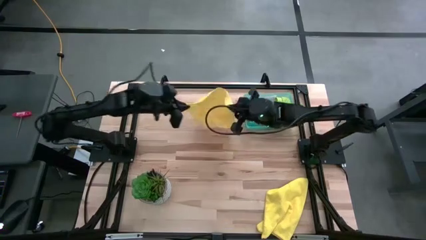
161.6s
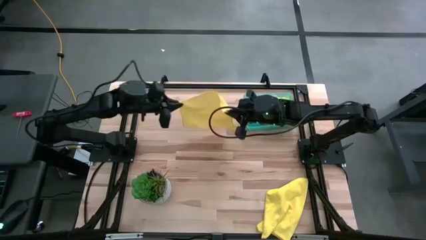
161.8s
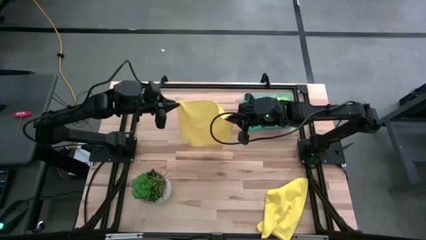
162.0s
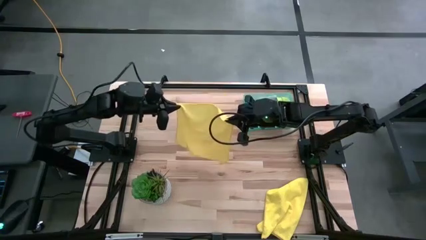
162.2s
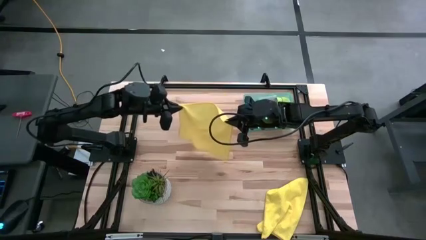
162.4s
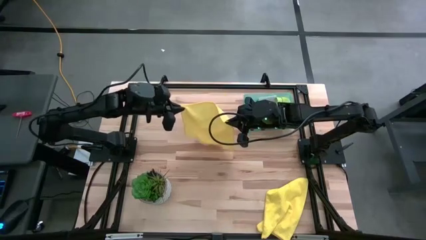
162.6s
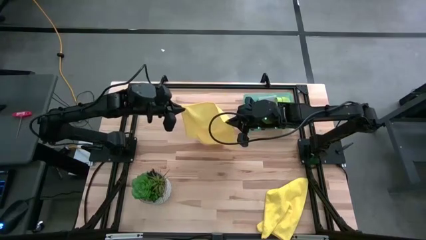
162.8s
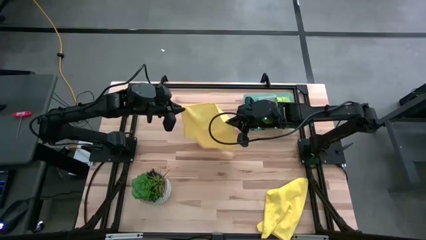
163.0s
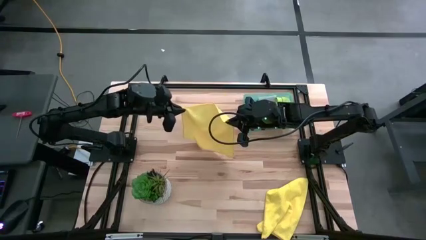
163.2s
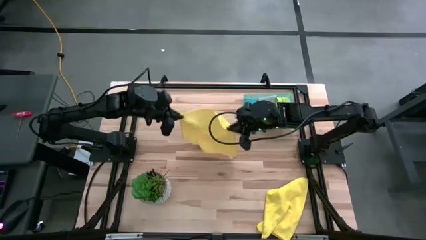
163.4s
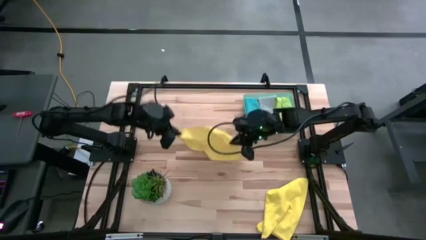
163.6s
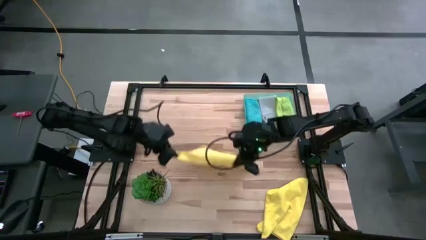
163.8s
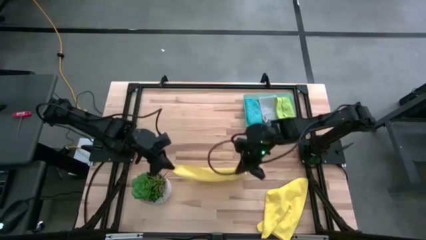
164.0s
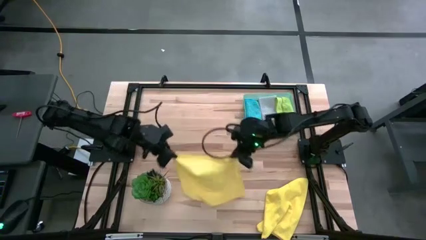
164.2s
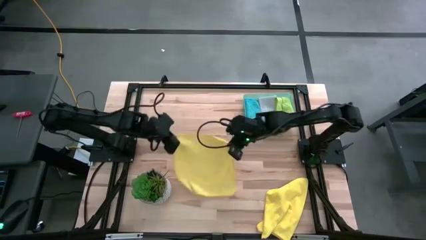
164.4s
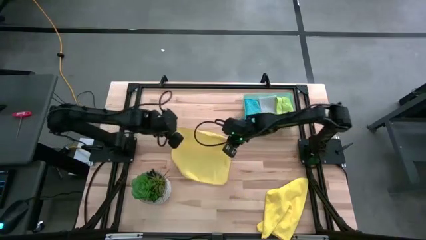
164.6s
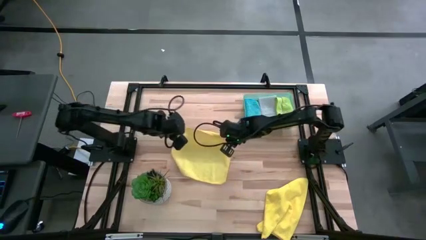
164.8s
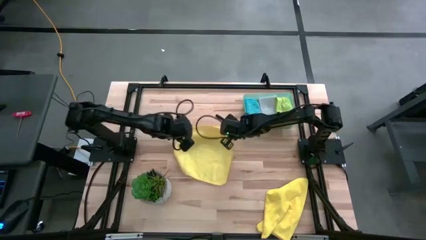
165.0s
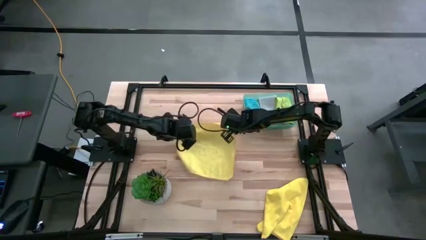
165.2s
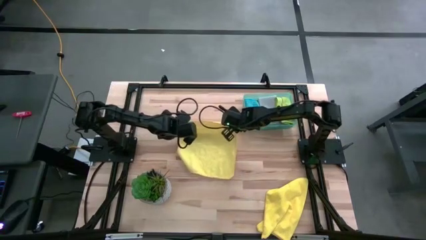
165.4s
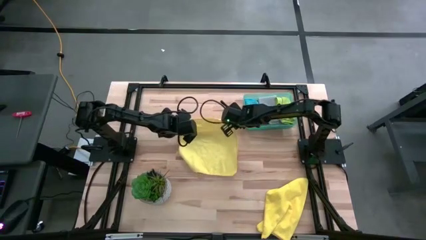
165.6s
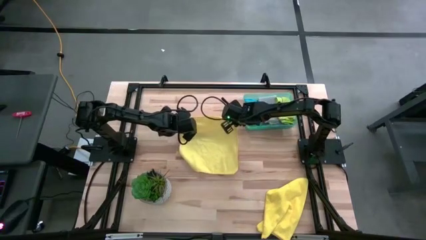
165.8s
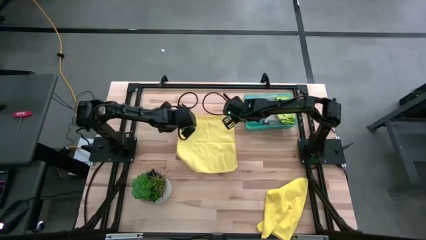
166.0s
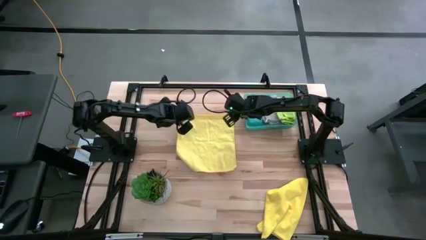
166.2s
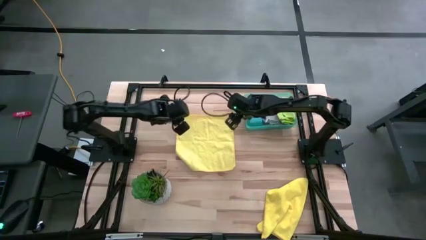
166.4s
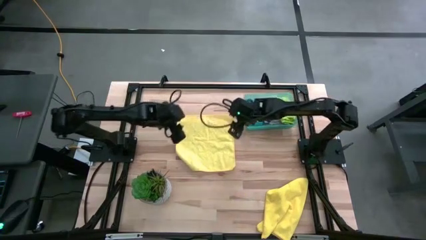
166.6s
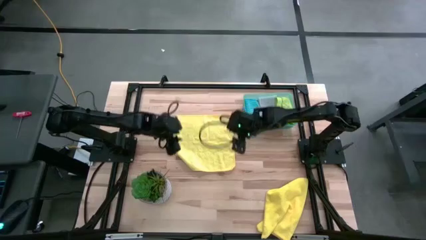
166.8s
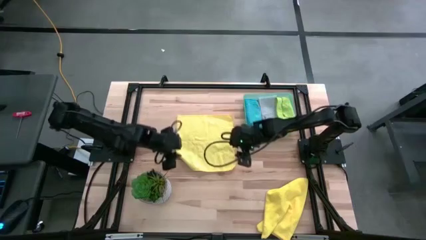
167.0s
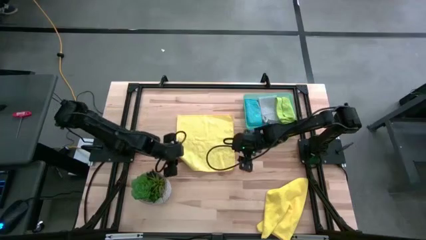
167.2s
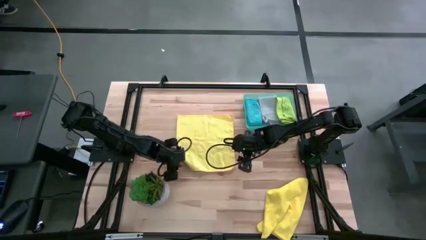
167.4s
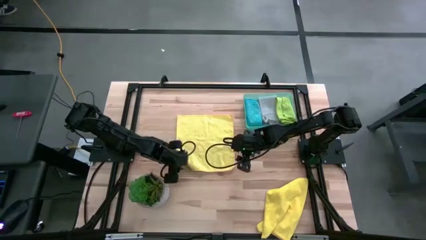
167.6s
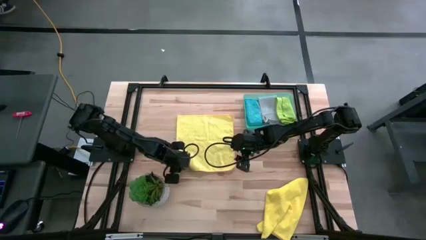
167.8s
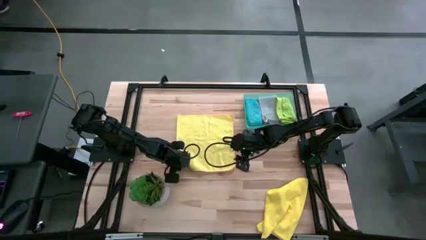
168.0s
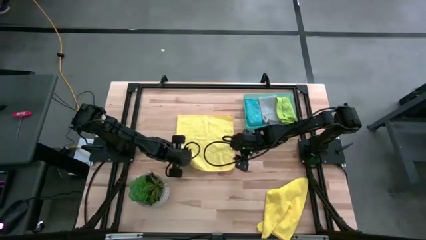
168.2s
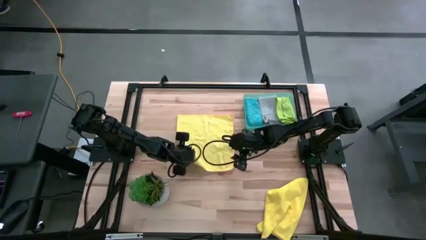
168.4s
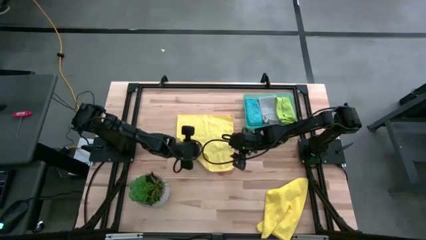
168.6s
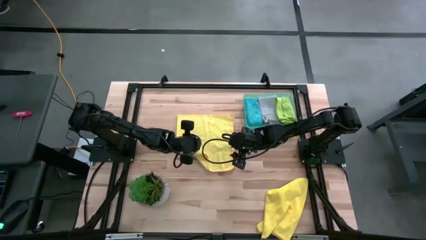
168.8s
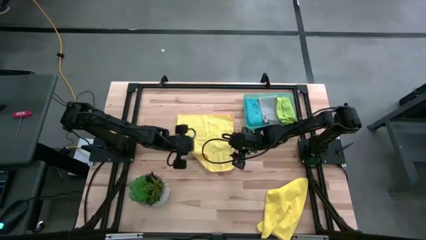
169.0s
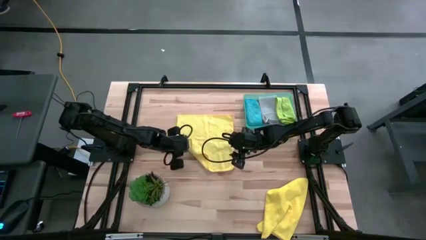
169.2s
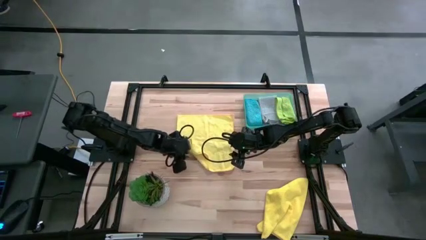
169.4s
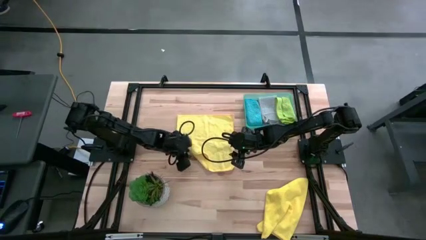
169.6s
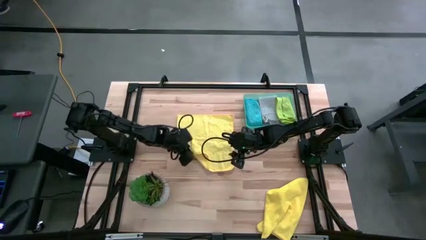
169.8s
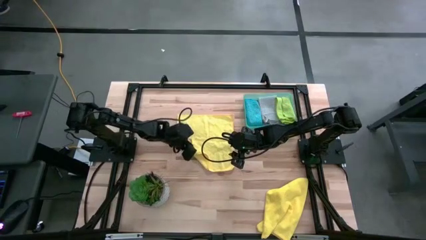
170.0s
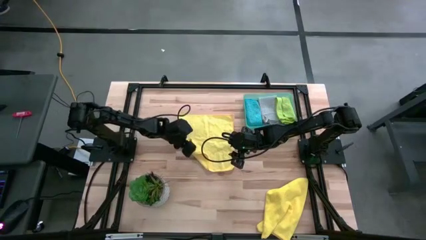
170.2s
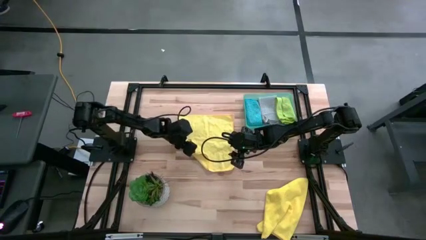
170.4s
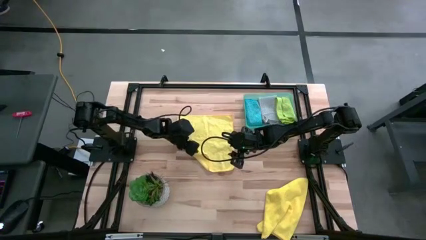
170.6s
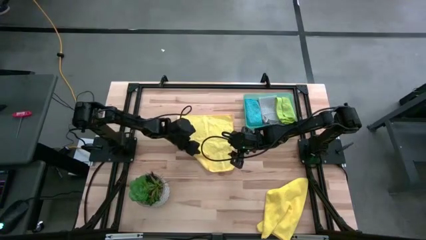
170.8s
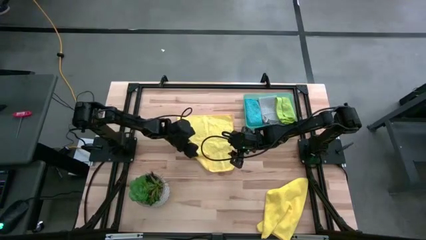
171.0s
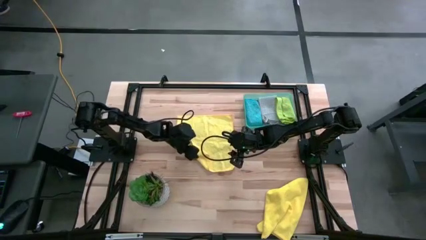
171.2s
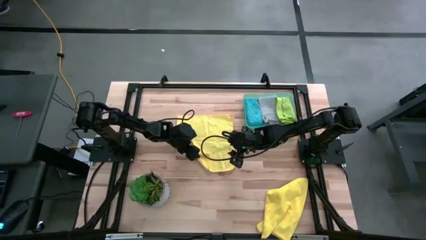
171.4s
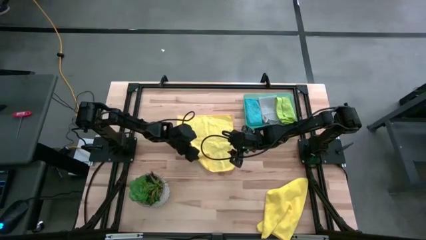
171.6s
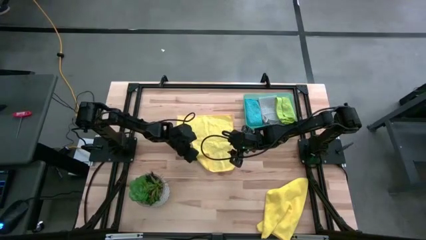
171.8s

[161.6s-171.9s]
Task: Fold microfiber towels
Fold the left yellow towel

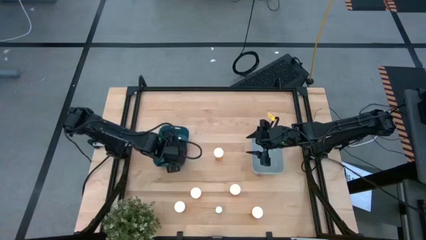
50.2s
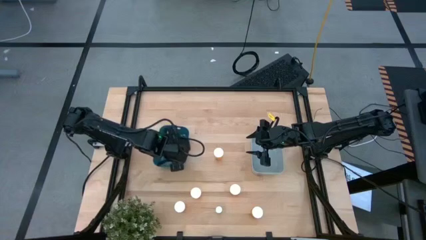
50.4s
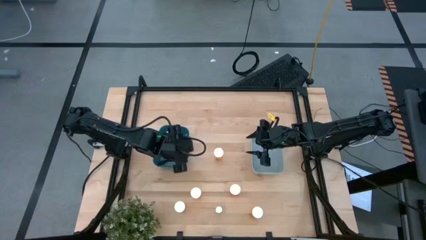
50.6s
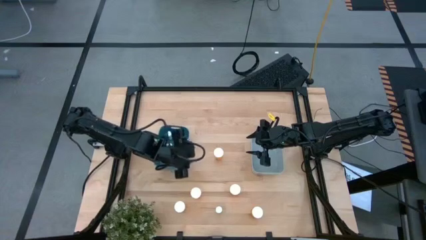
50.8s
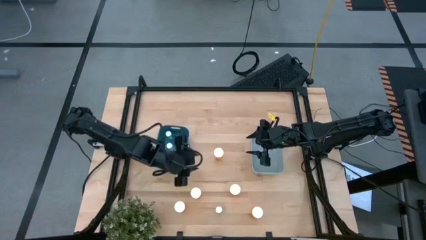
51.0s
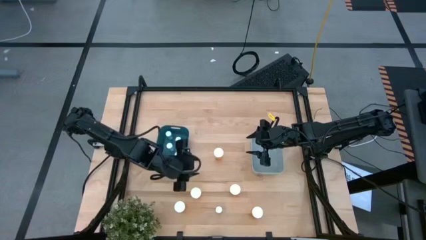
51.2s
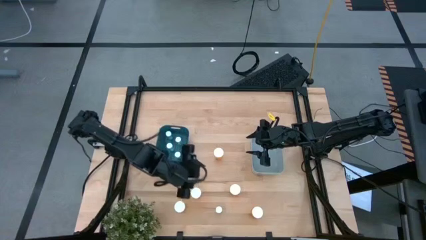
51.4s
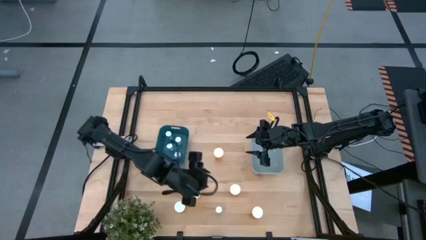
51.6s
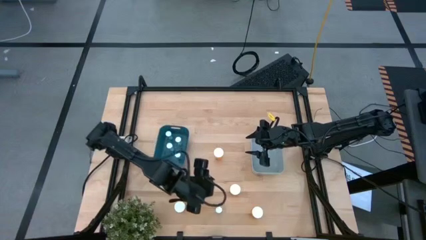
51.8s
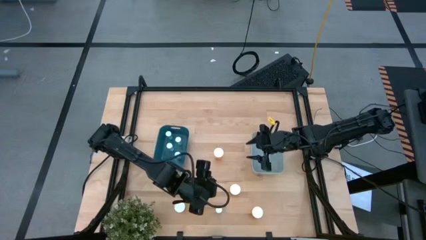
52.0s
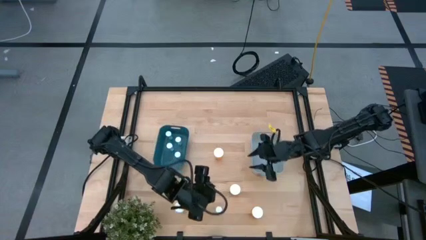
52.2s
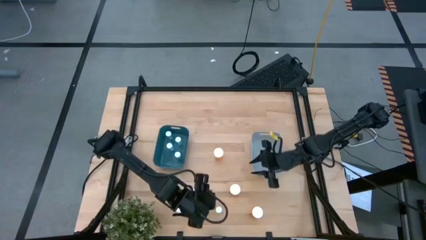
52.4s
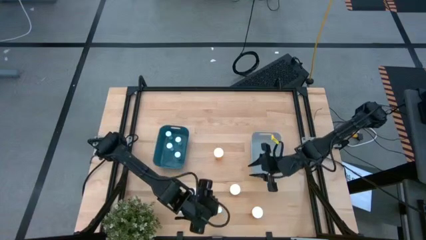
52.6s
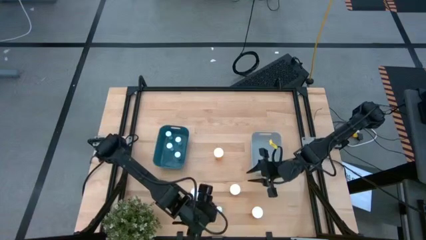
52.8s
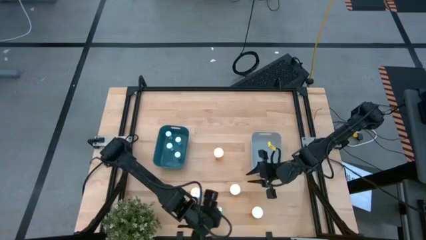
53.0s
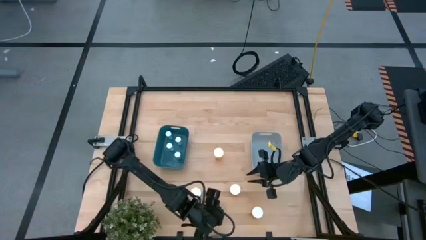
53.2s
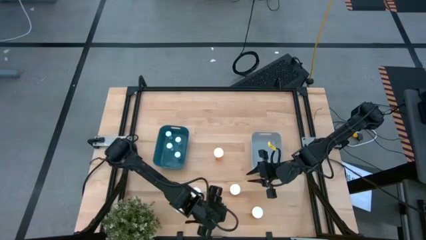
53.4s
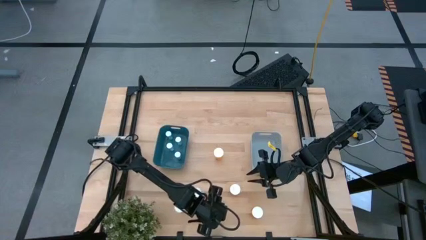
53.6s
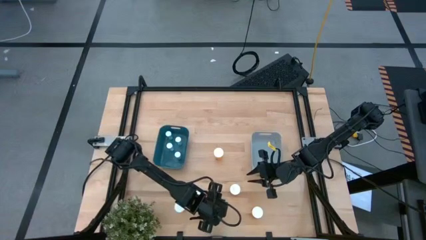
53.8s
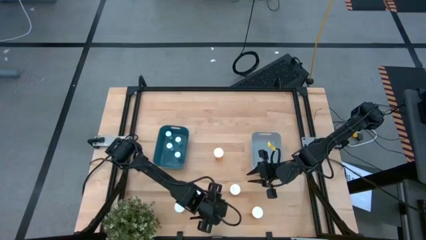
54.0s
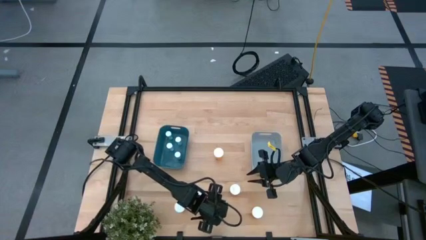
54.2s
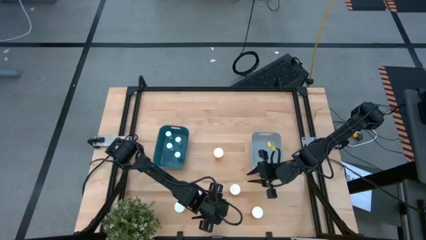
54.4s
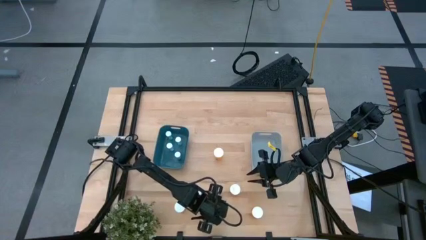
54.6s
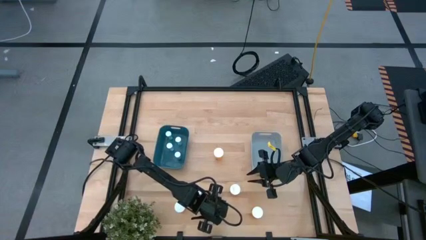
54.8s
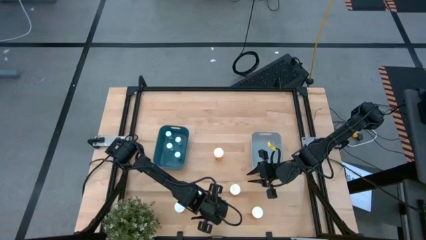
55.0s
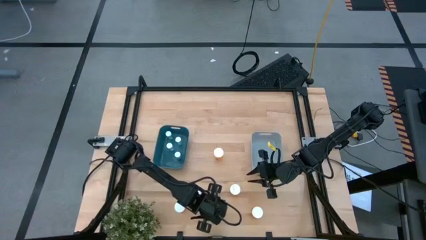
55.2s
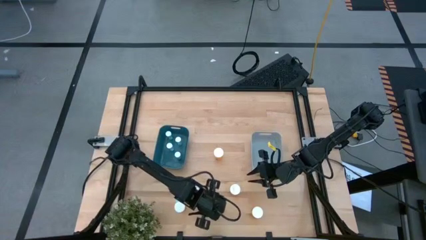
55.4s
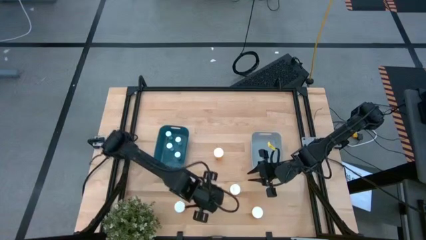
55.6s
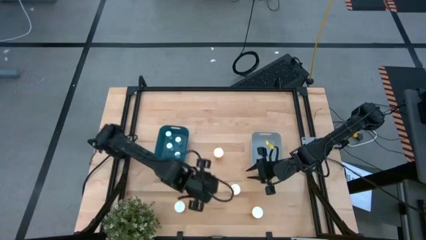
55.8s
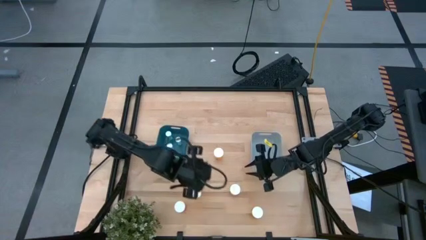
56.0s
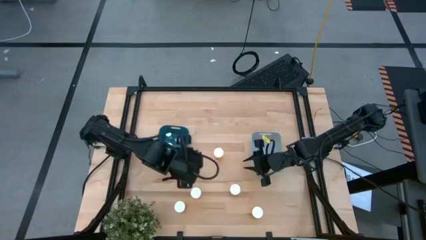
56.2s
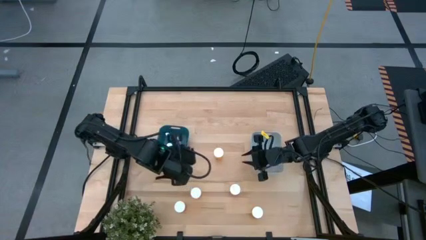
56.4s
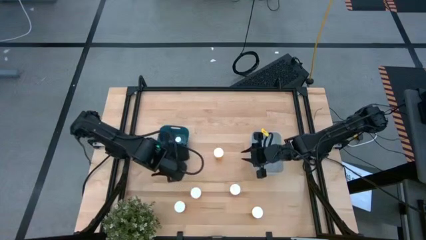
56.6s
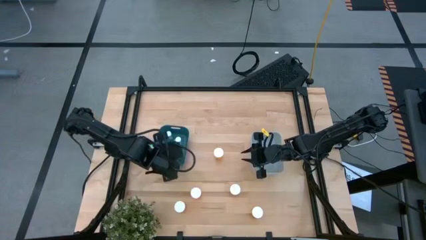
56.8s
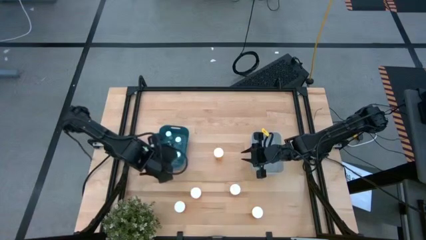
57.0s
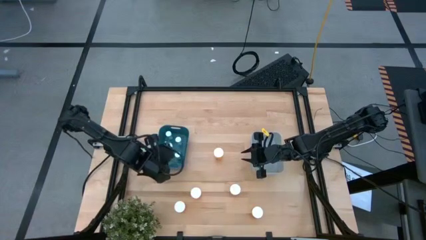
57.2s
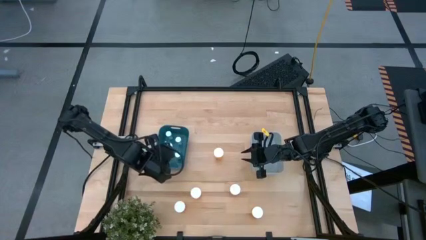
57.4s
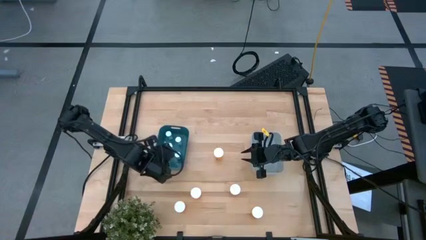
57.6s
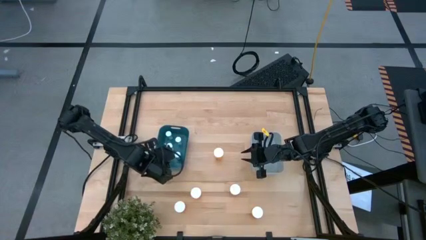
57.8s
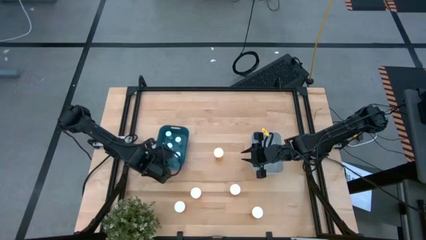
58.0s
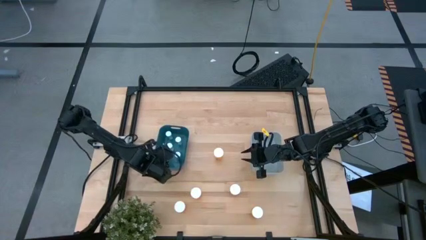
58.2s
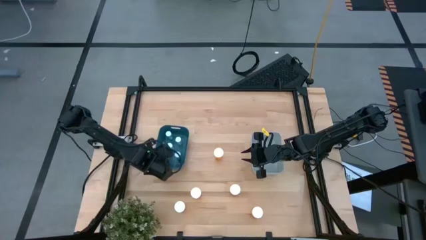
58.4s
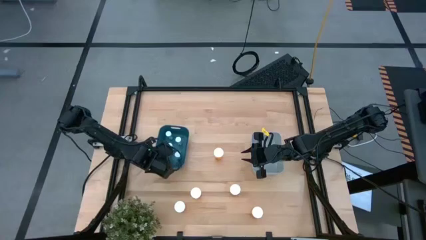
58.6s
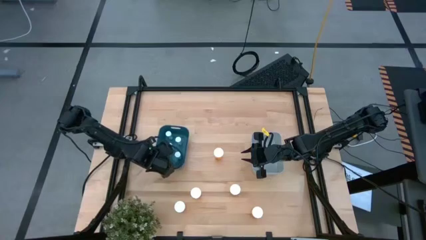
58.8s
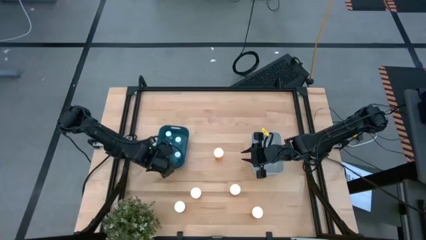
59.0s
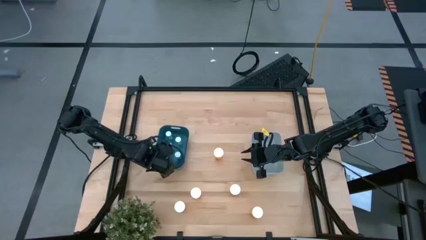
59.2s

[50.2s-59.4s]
Task: Pick and place medicine bottles into bin by pill shape (circle, oval)
Put the blue pill bottle into the blue bin
